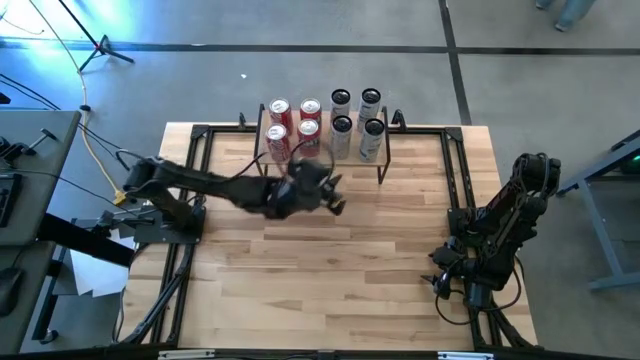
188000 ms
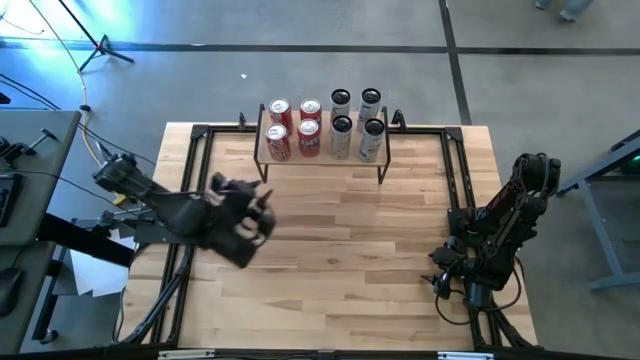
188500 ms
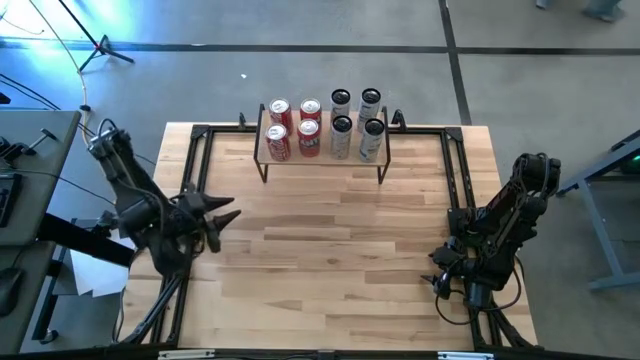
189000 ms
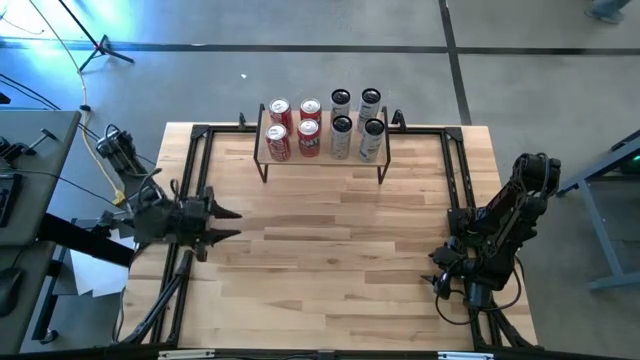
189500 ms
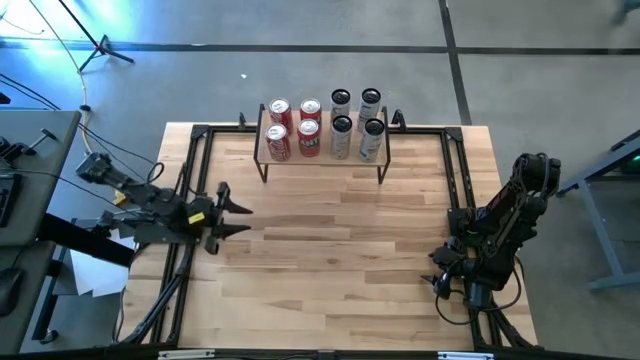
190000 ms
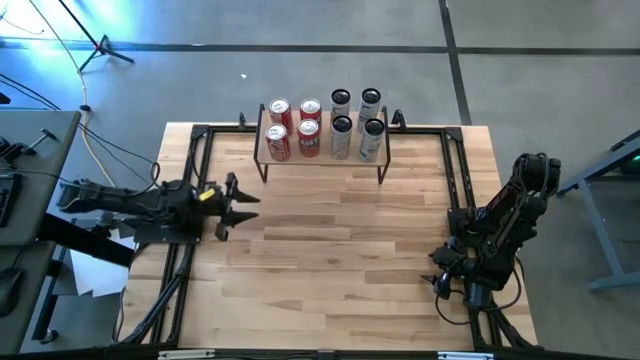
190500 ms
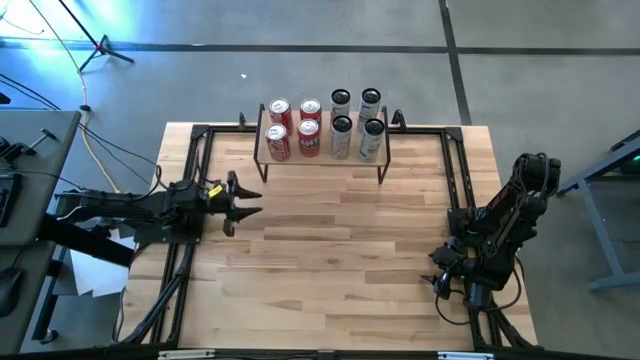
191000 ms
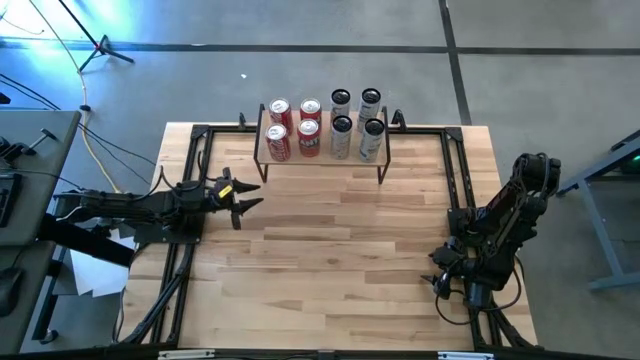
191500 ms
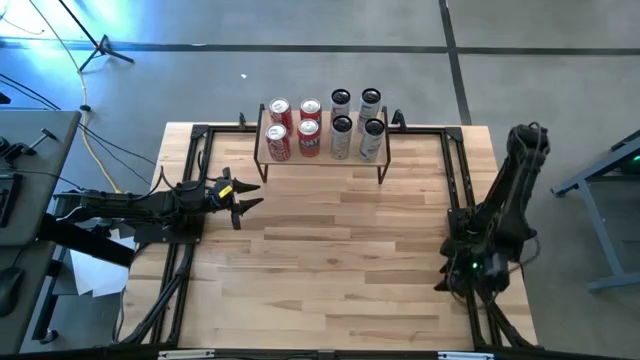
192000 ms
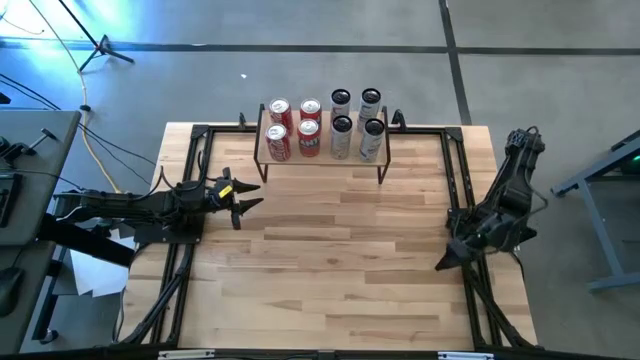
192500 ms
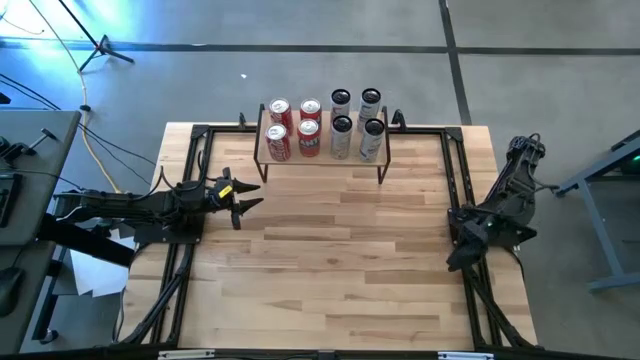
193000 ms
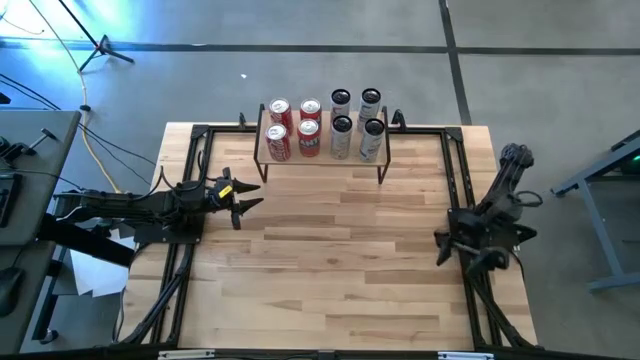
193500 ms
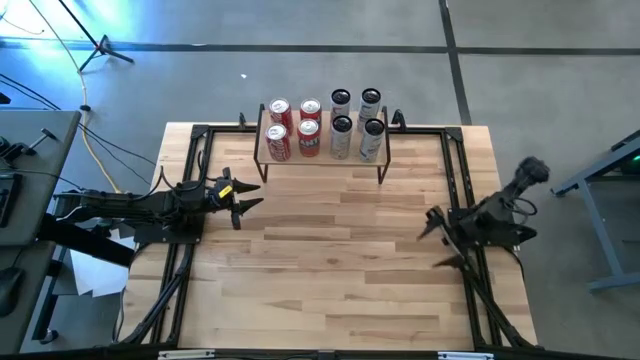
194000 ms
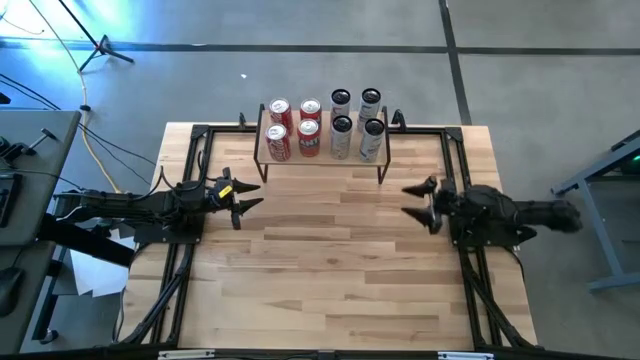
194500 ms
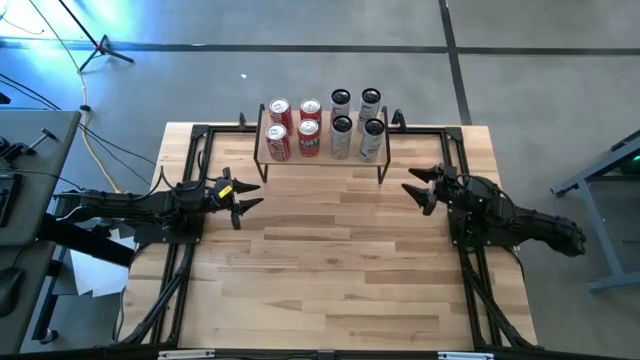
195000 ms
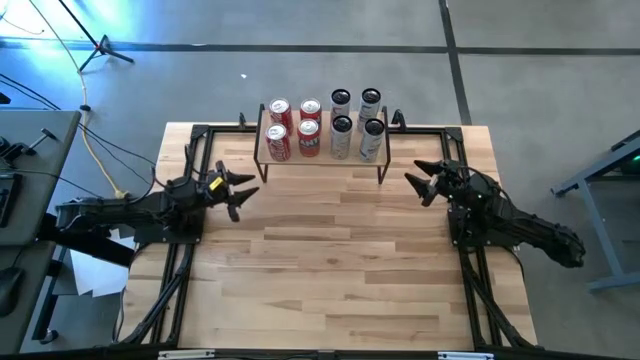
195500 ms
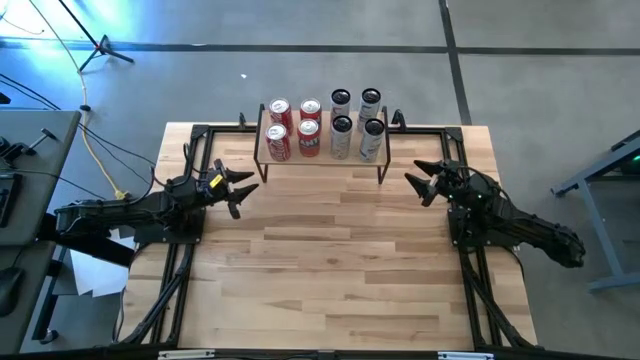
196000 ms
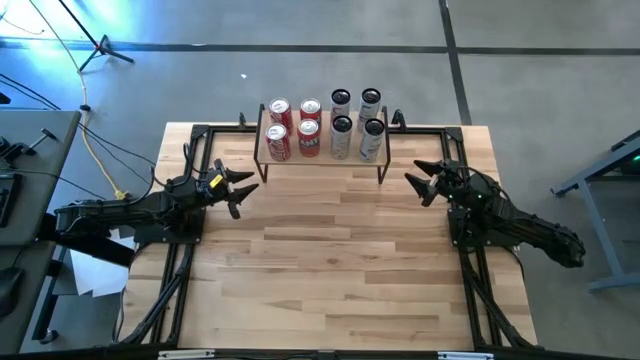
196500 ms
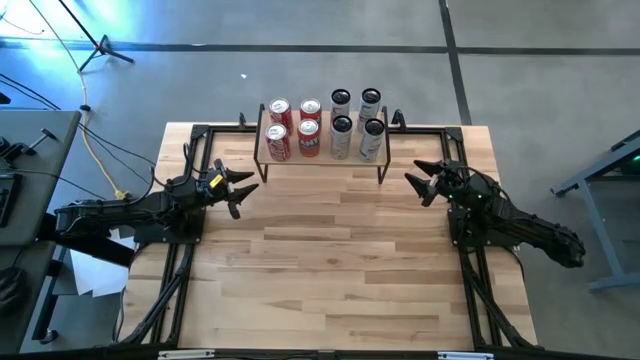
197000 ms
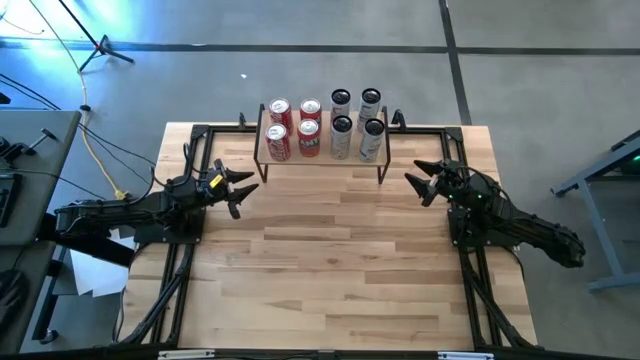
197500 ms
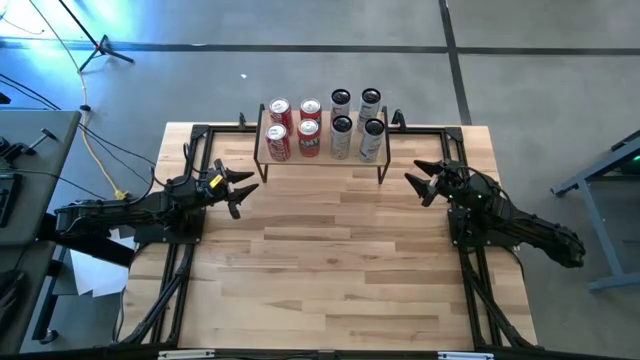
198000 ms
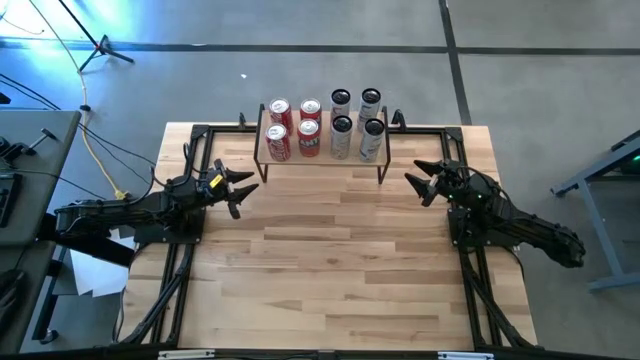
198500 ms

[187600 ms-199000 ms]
Task: Place canned beverage on shelf
Return to Home Position

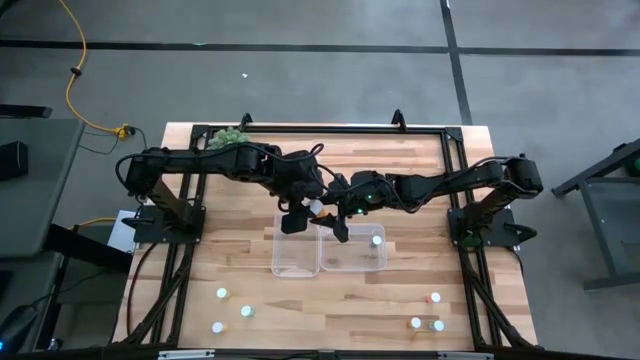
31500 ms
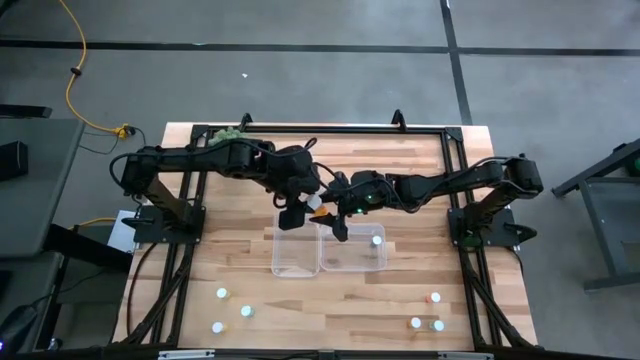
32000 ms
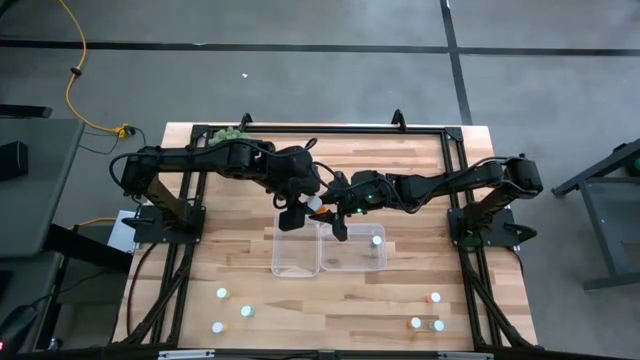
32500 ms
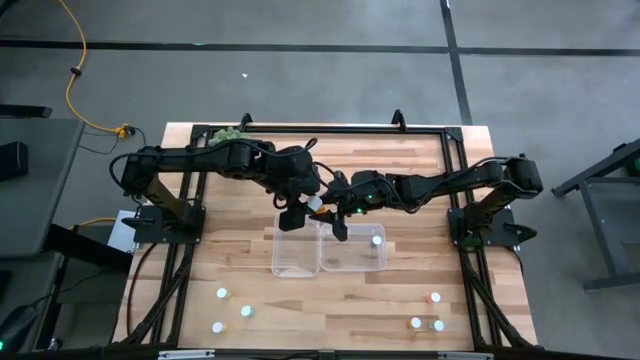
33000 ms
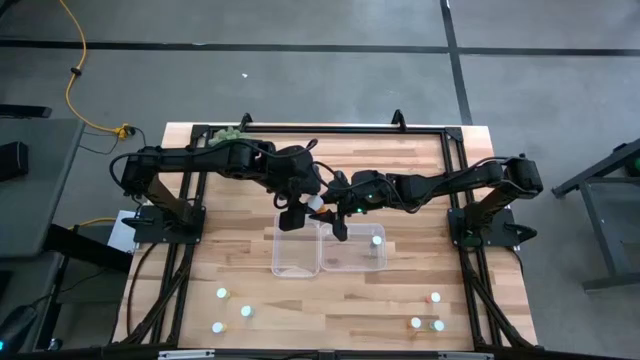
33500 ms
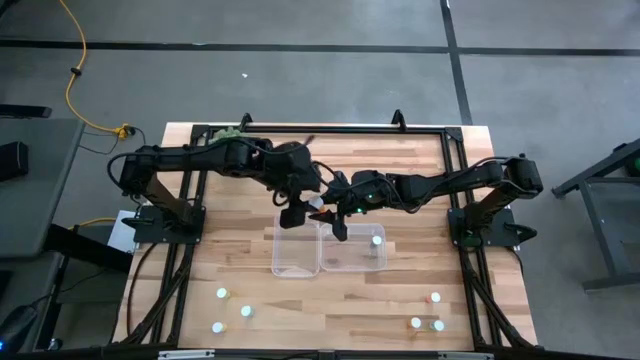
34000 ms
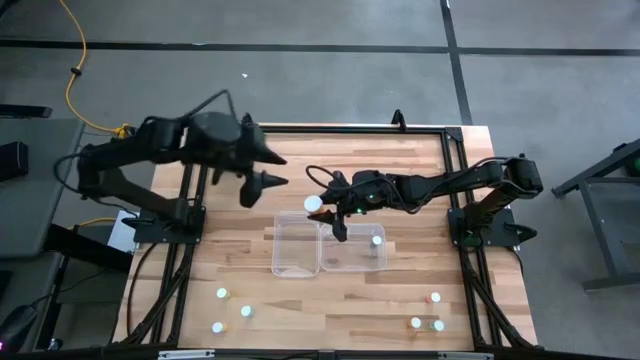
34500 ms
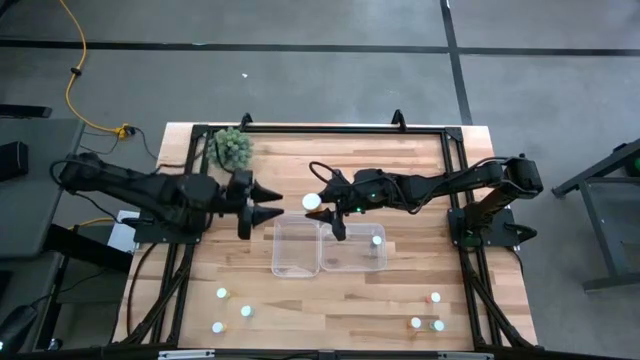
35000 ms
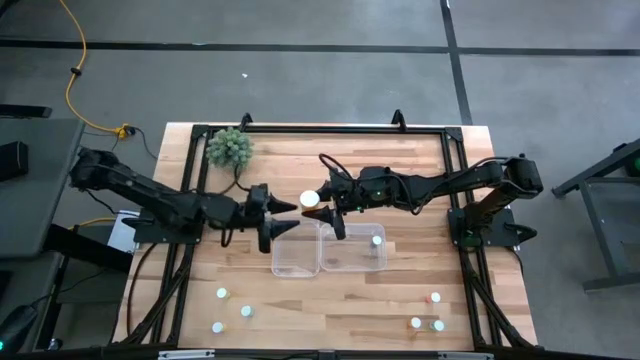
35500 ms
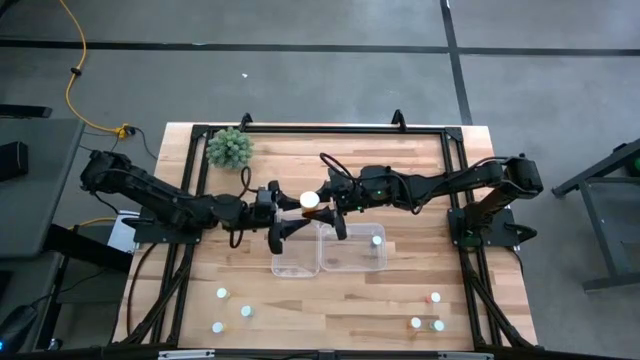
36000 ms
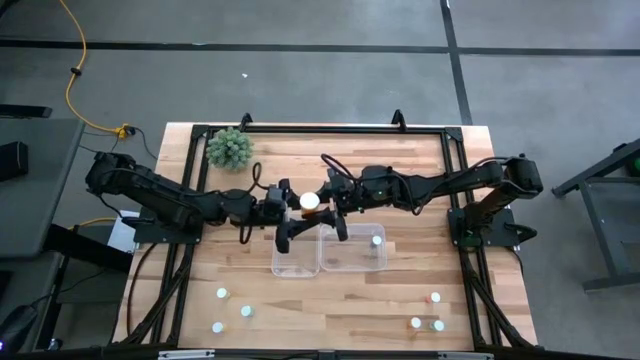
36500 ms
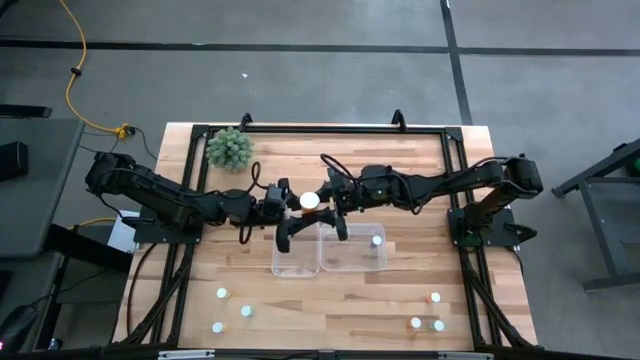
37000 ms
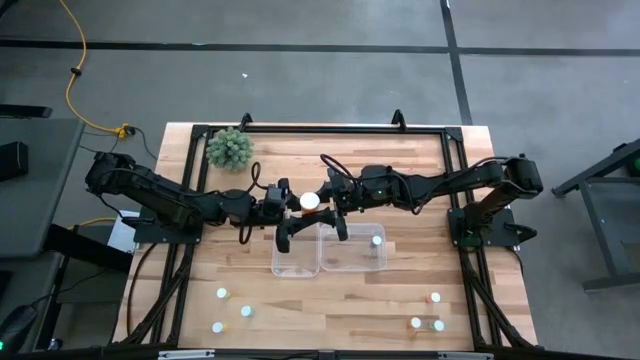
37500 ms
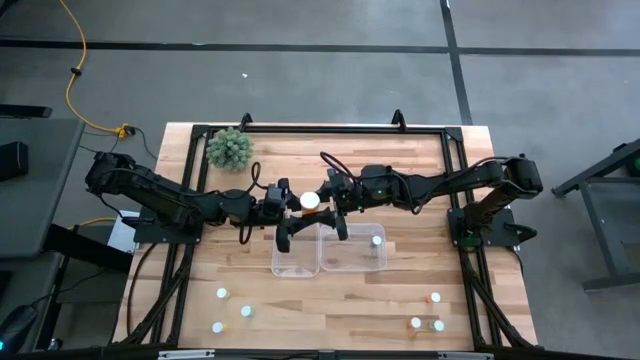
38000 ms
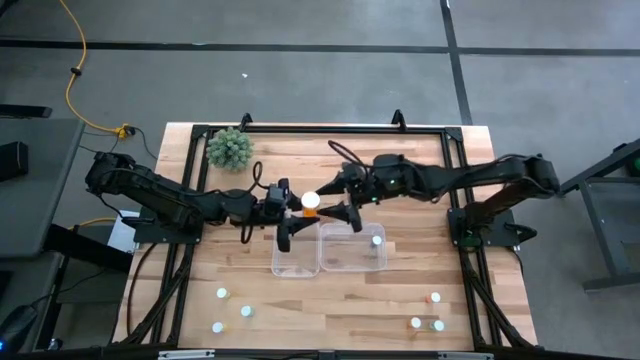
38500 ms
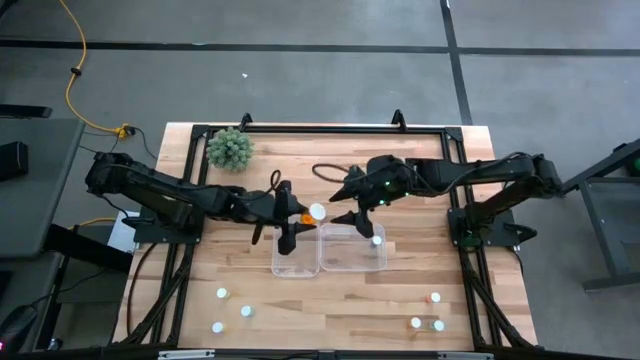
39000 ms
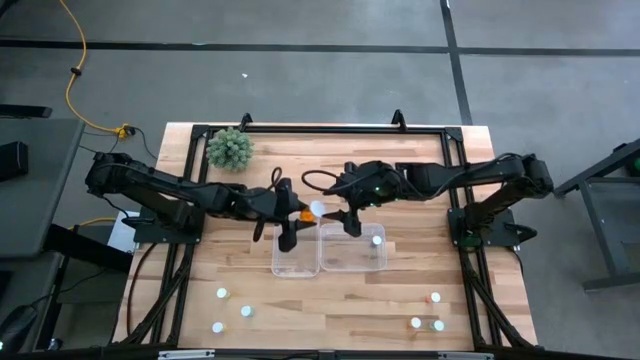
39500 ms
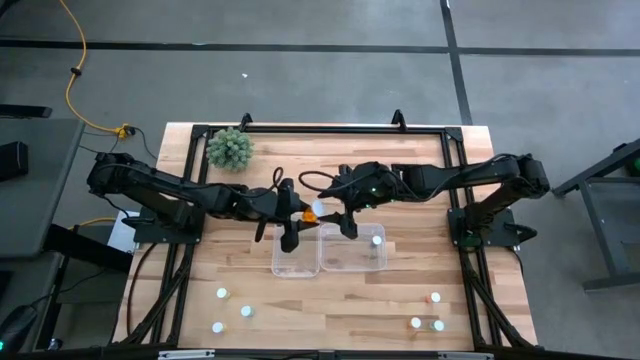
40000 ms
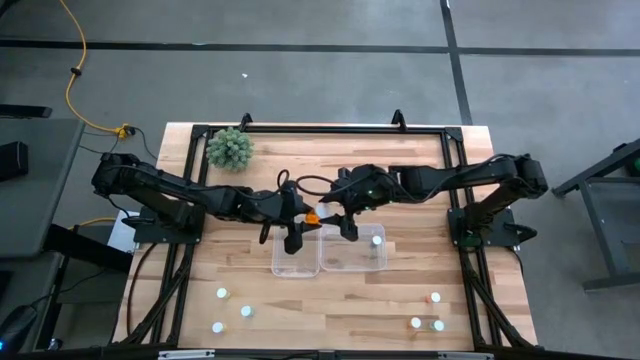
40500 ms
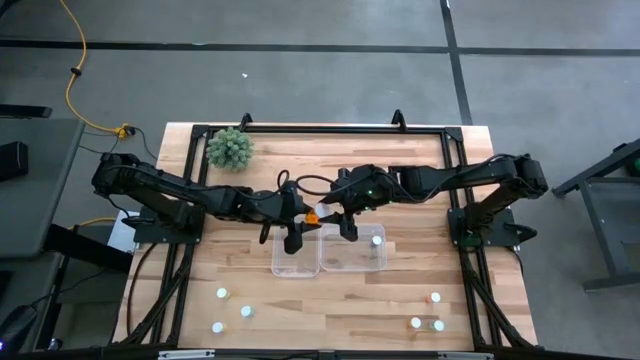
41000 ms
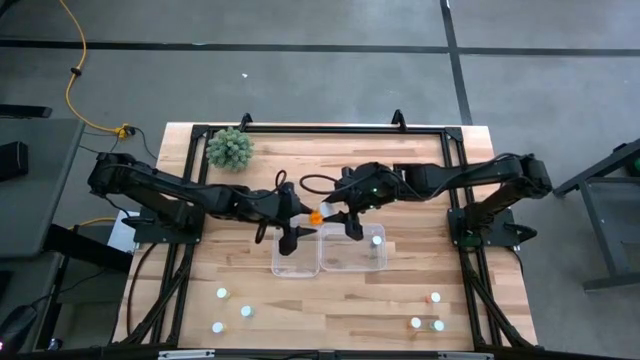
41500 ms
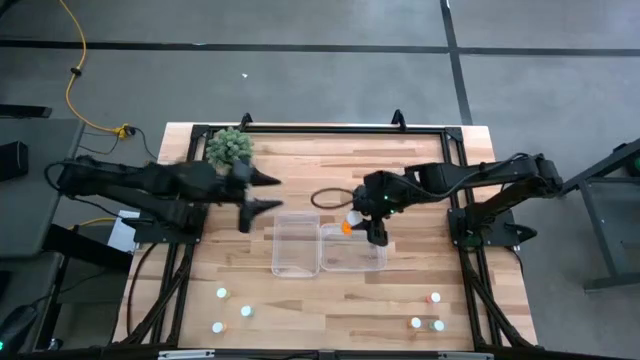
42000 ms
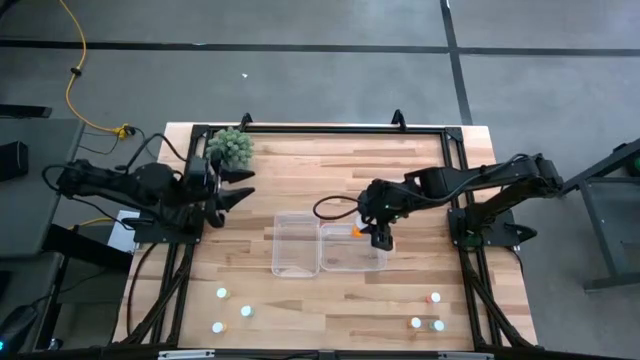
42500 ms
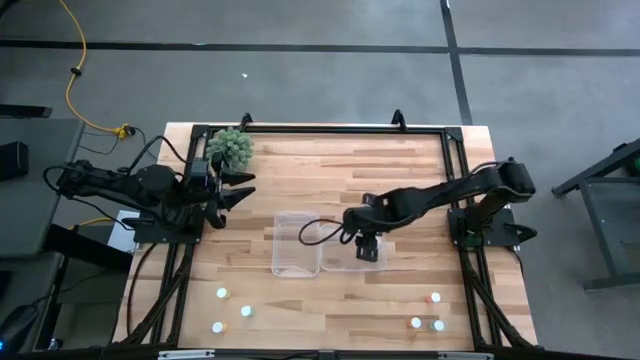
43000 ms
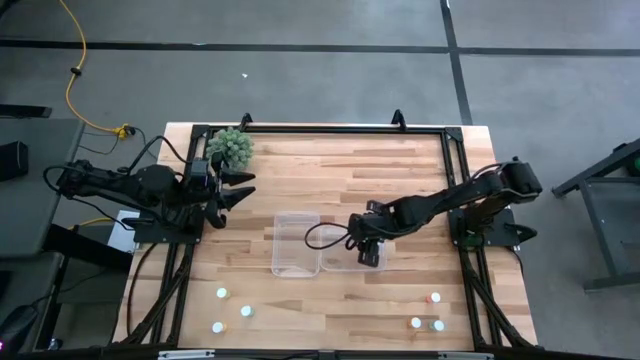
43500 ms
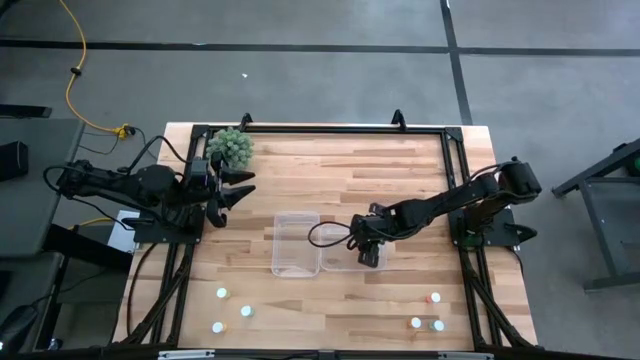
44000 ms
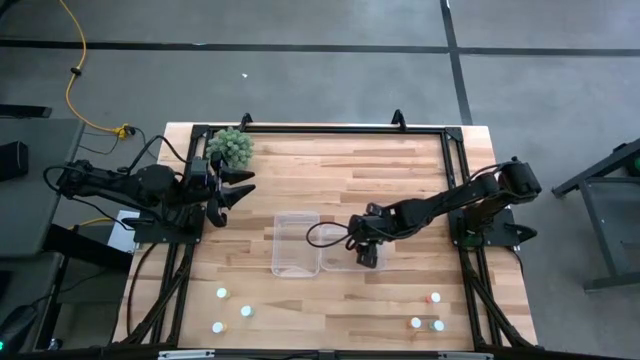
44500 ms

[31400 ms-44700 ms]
Task: Pick and place medicine bottles into bin by pill shape (circle, oval)
Put the large orange pill bottle into the right transparent bin
